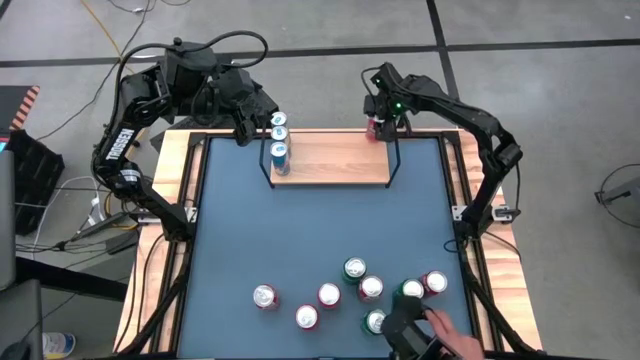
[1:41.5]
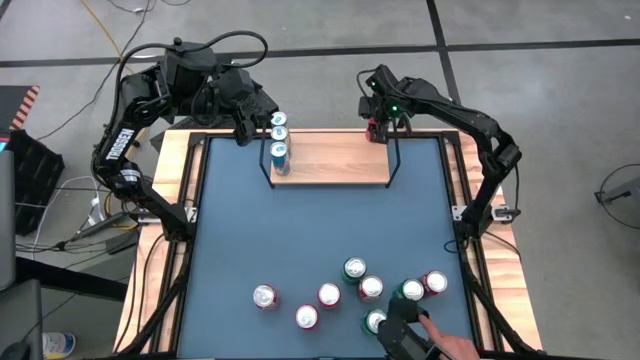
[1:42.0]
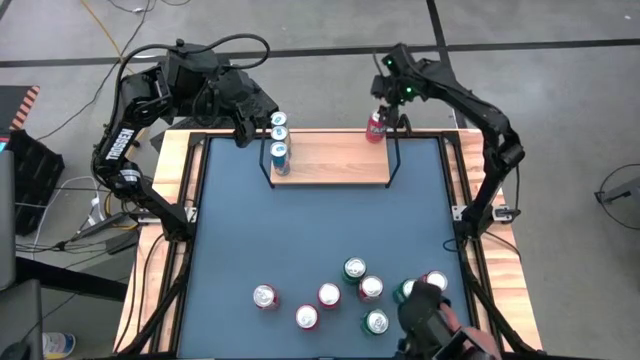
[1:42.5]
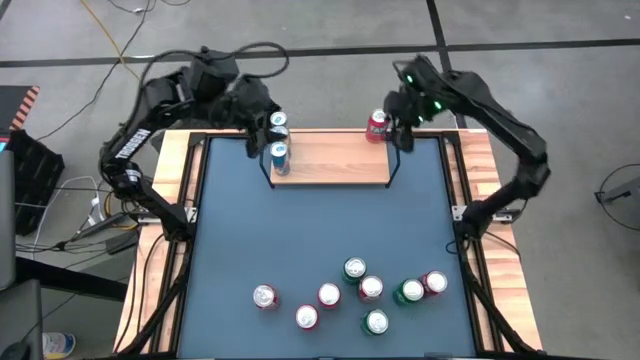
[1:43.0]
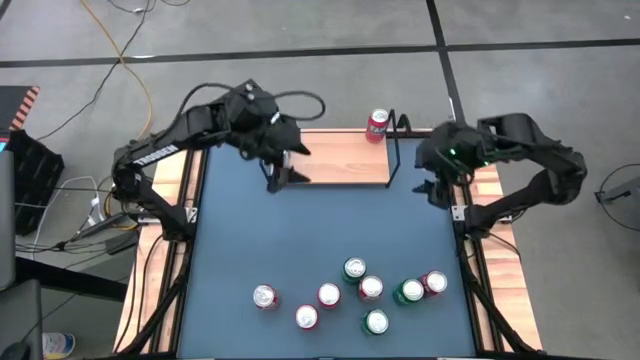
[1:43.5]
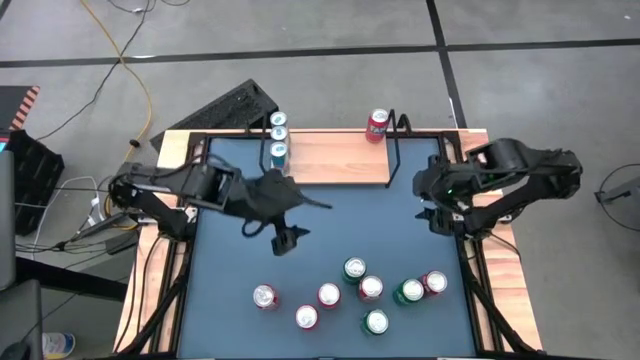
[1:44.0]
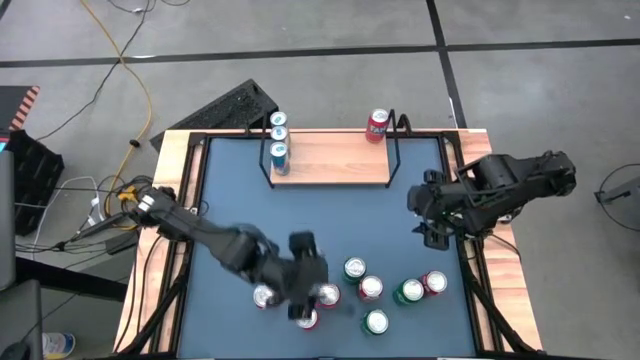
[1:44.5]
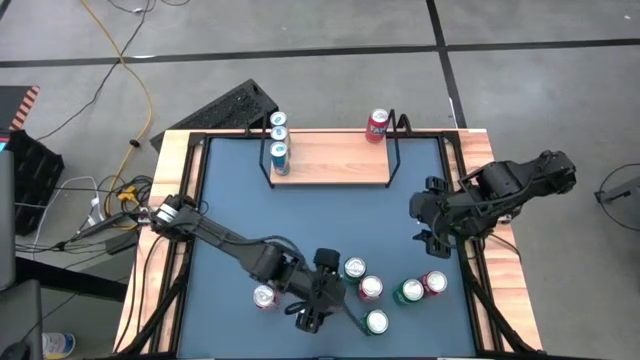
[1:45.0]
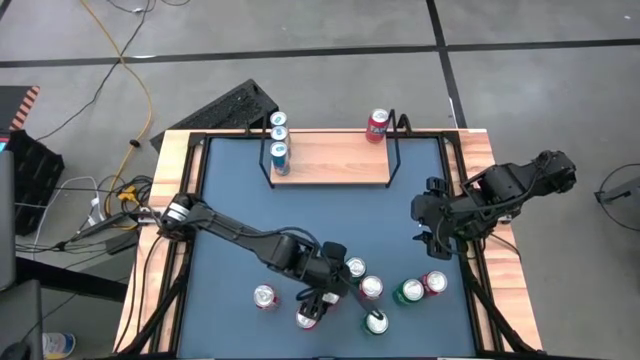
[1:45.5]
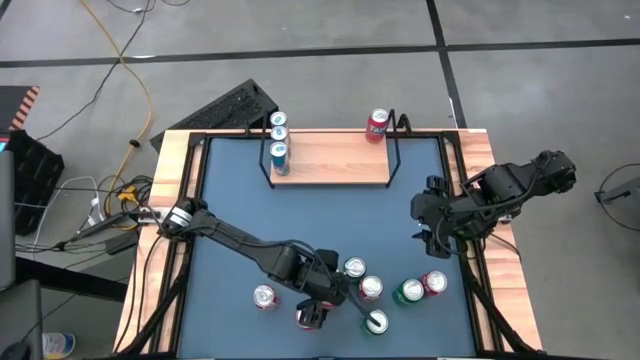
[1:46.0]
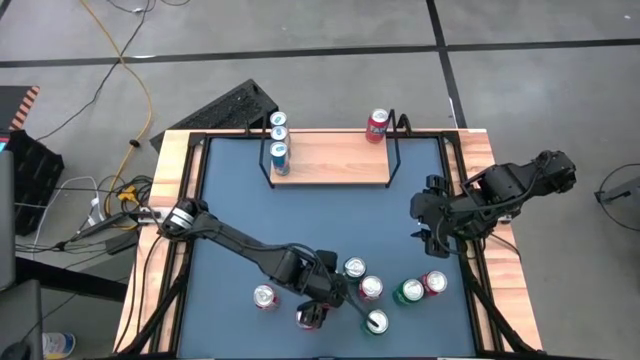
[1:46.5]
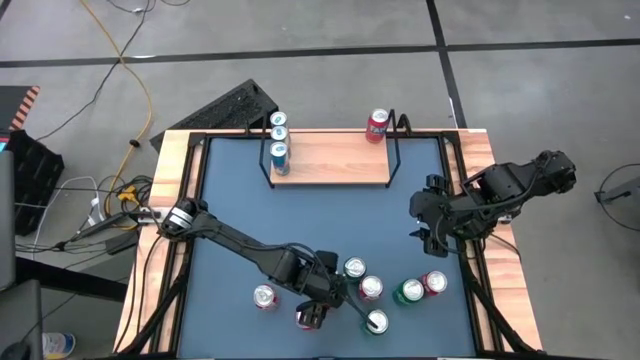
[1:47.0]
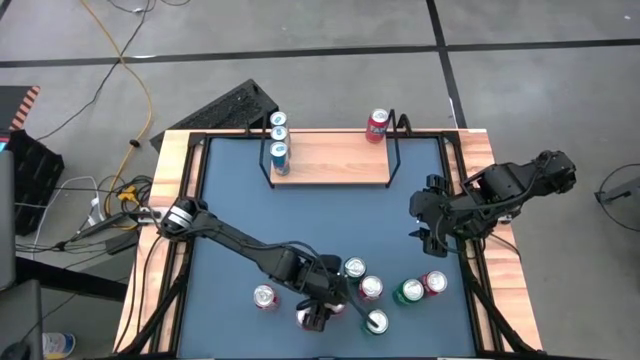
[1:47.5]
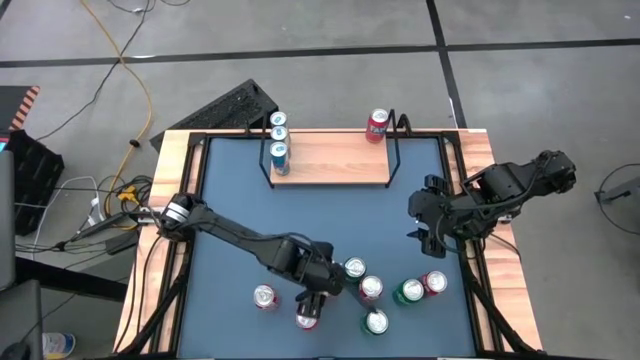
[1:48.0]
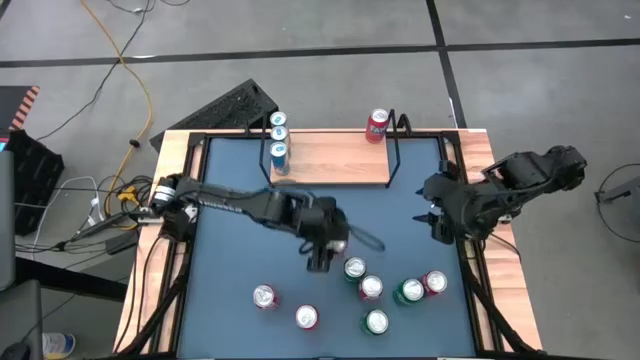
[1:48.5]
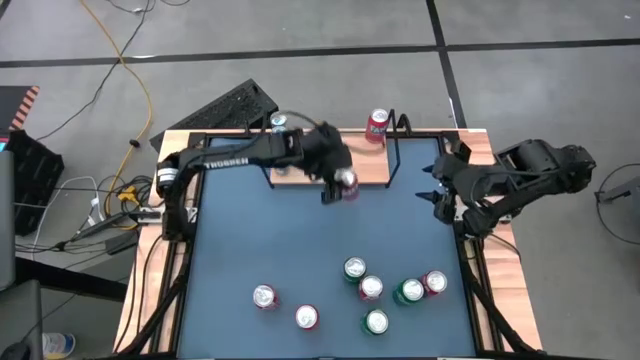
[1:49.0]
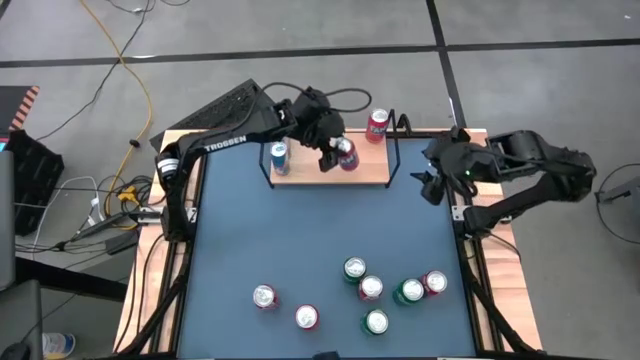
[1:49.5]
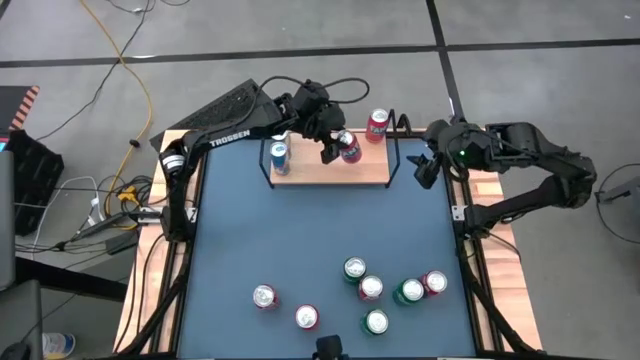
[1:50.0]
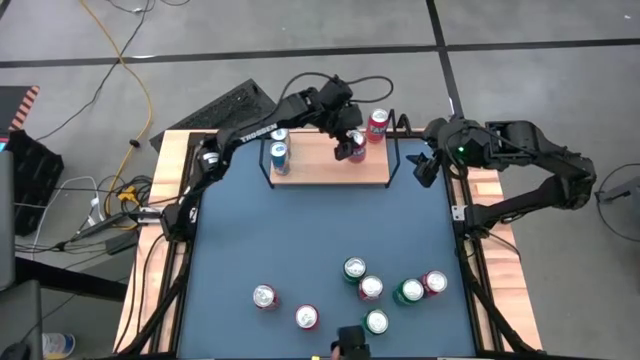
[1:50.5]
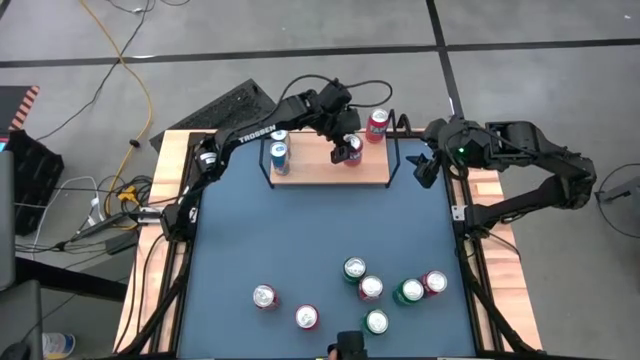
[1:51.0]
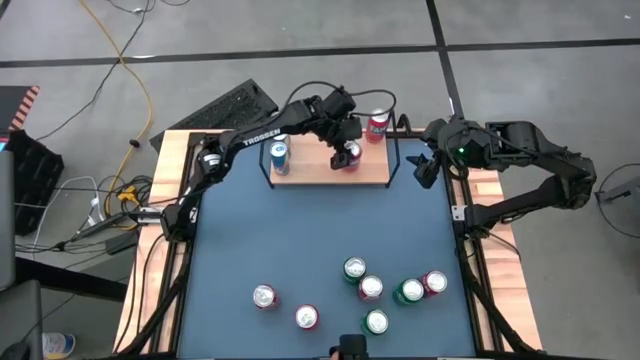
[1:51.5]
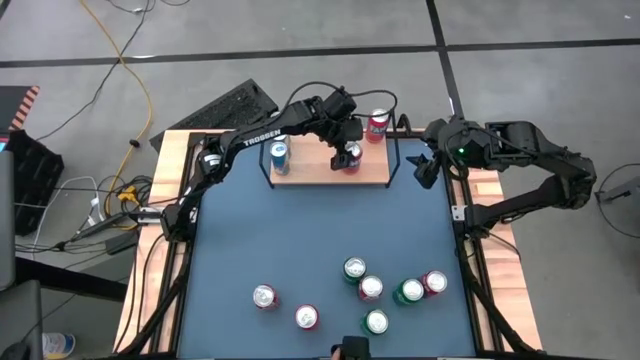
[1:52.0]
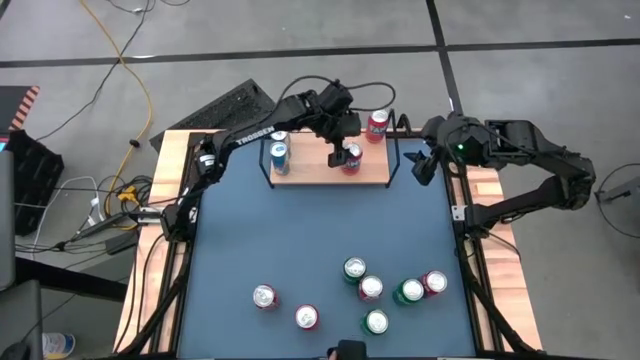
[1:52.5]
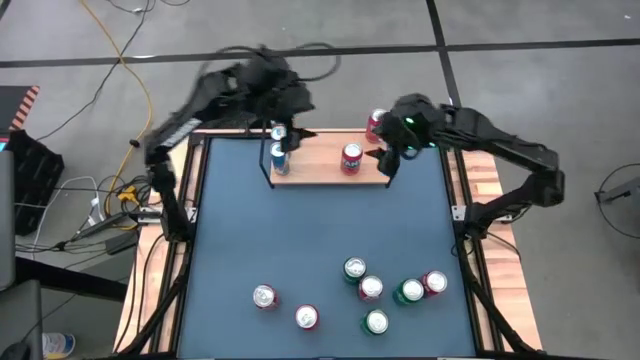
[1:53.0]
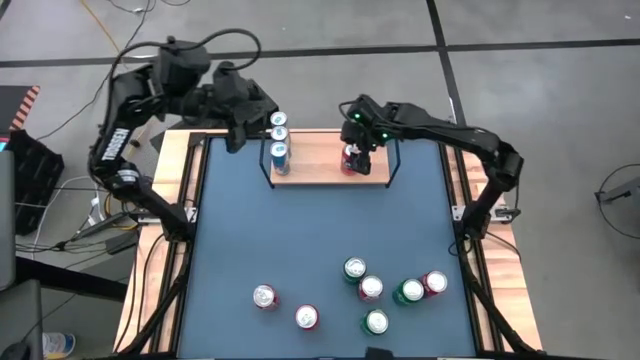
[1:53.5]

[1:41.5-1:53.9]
Task: Place canned beverage on shelf
Put the top red soda can on the shelf aligned with the other red soda can
